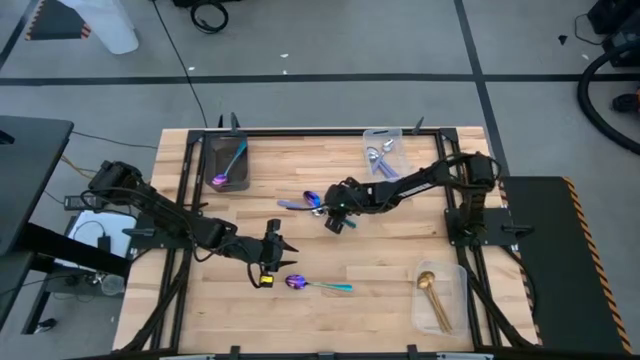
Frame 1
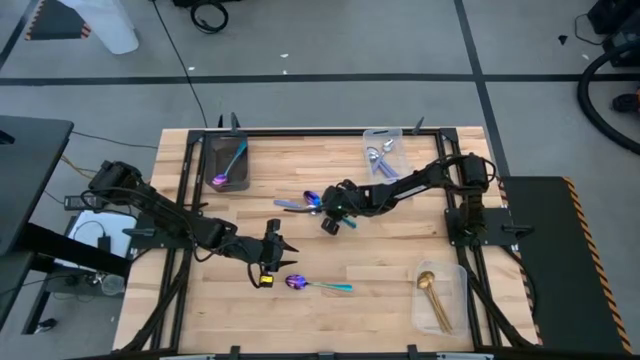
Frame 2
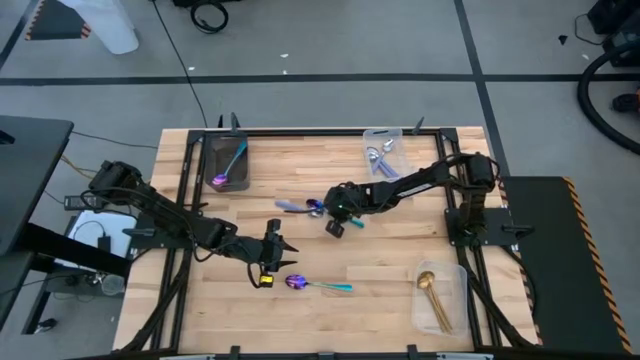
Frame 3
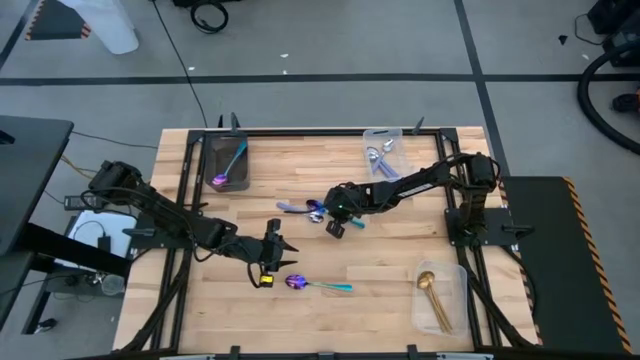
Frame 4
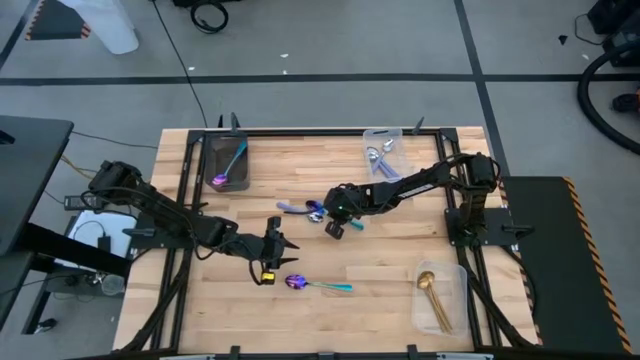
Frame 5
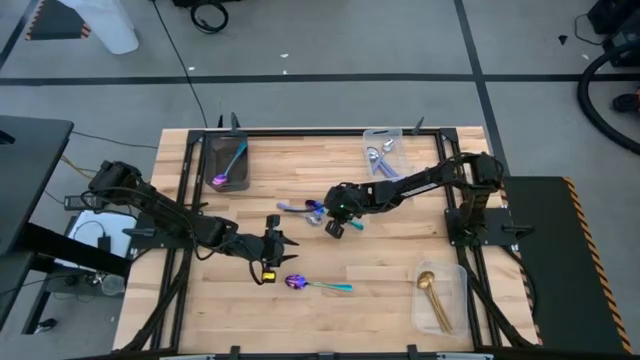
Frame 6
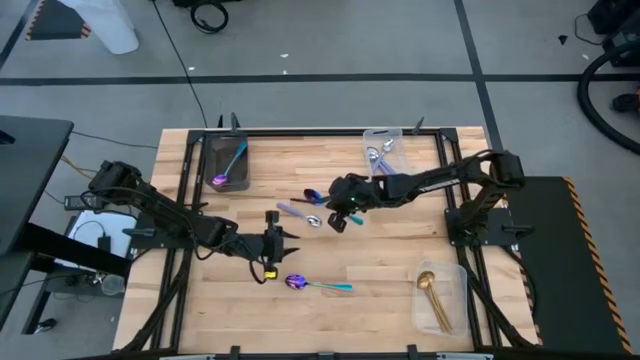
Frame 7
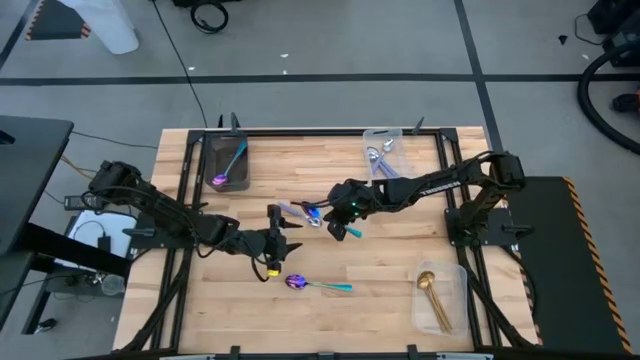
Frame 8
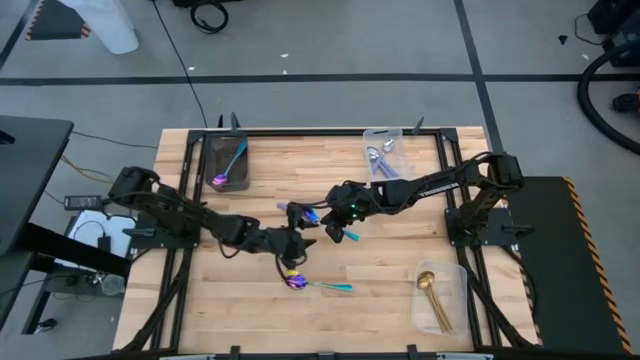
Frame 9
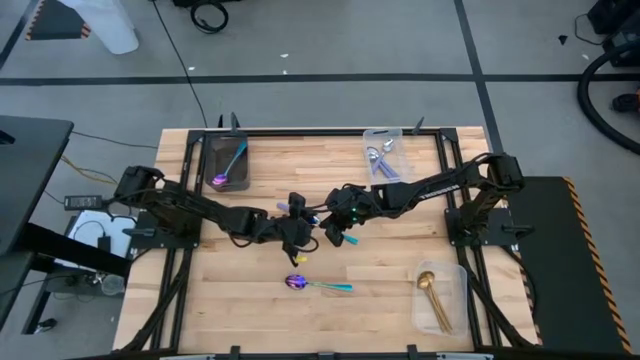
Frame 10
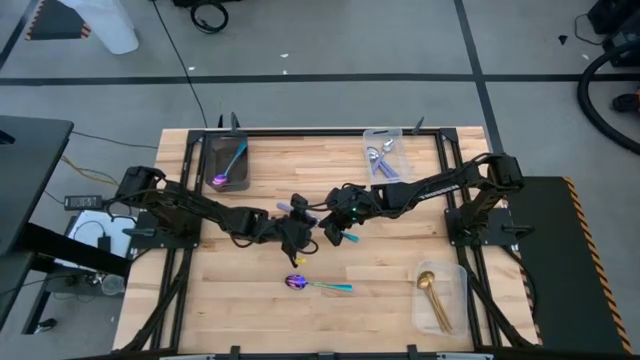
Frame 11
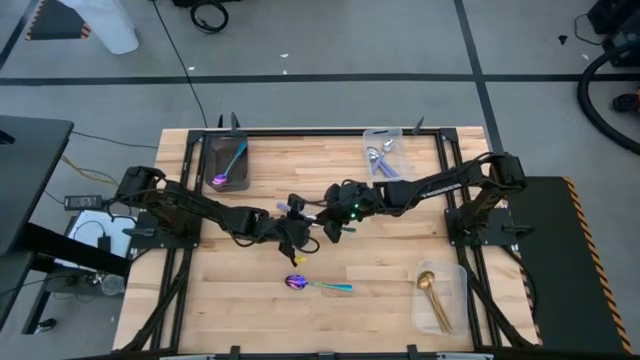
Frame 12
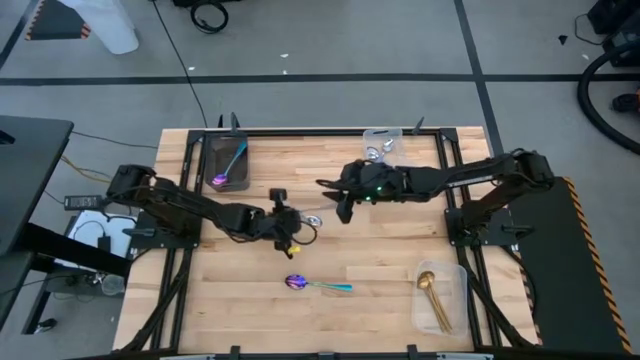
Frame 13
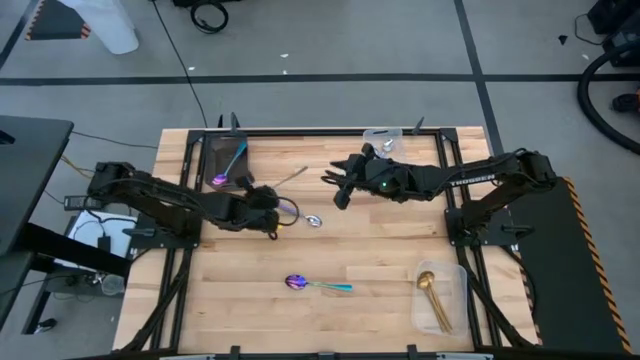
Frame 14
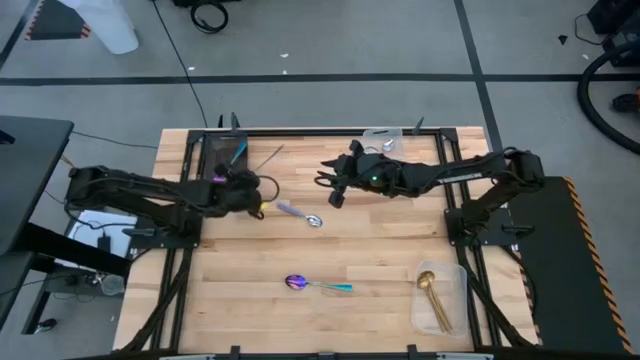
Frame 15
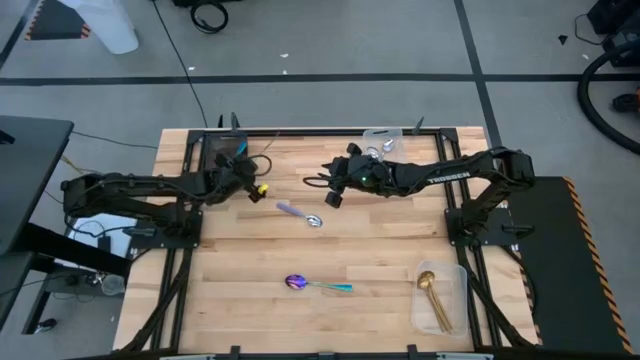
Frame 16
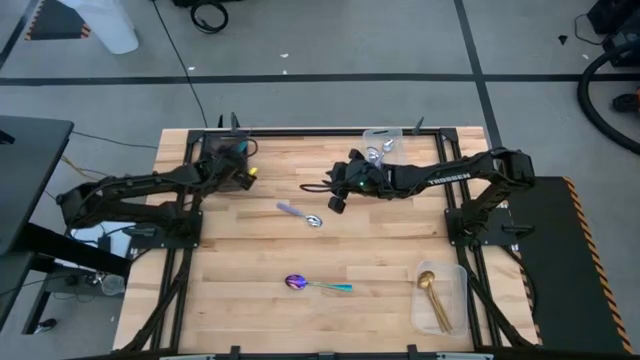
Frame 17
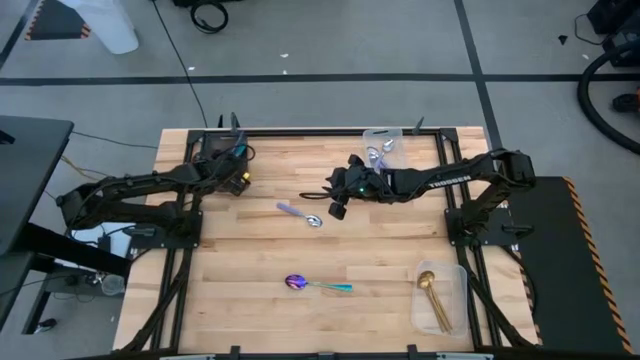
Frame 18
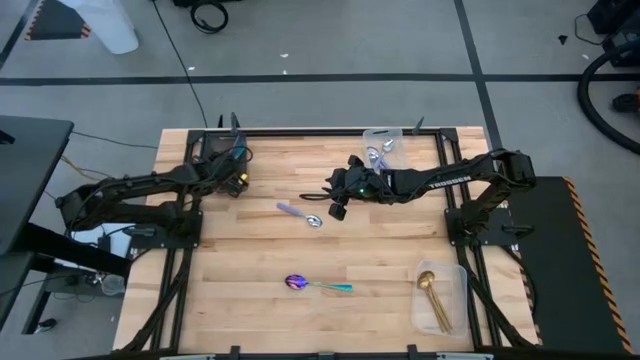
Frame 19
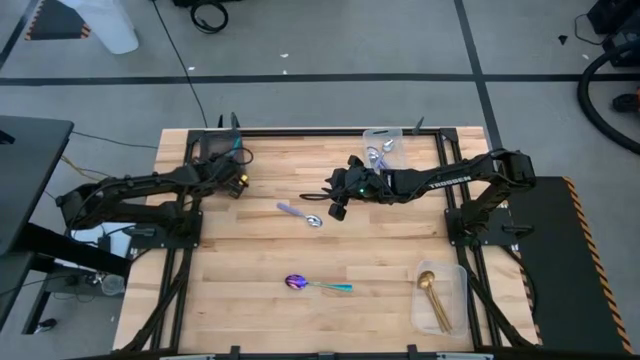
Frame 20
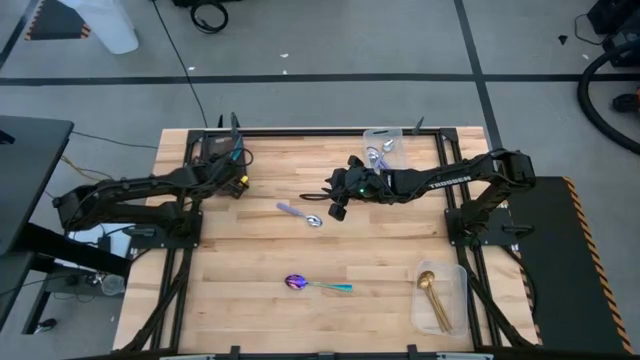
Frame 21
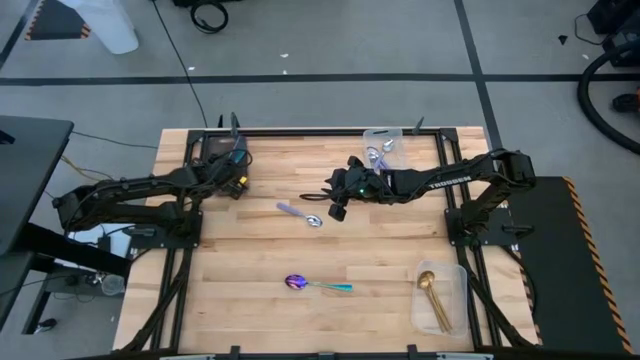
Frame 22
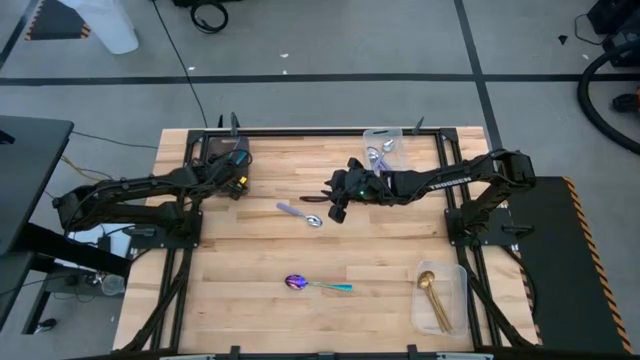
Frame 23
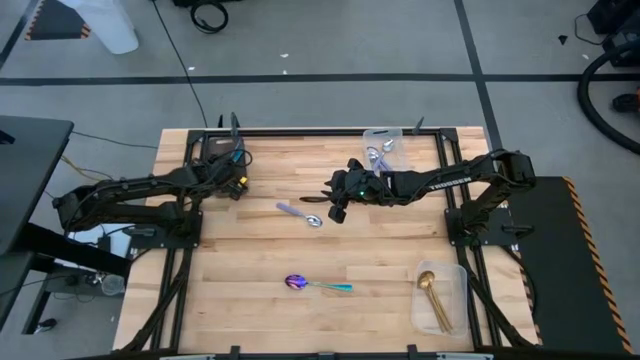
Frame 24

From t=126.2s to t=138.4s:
Task: Sort silverware by color (type)
Put the blue spoon into the black bin

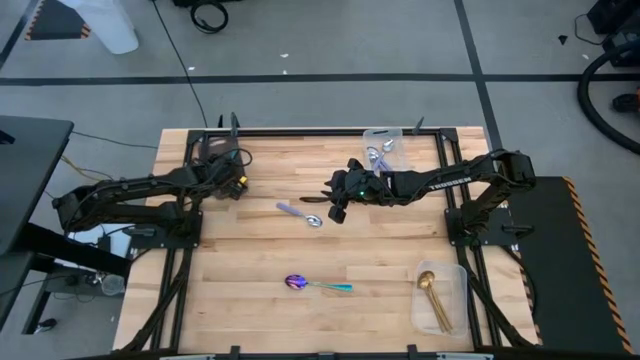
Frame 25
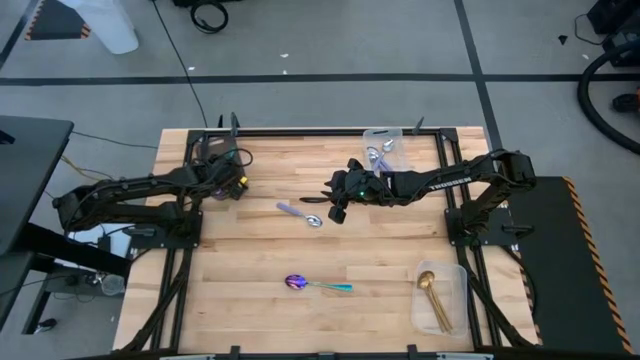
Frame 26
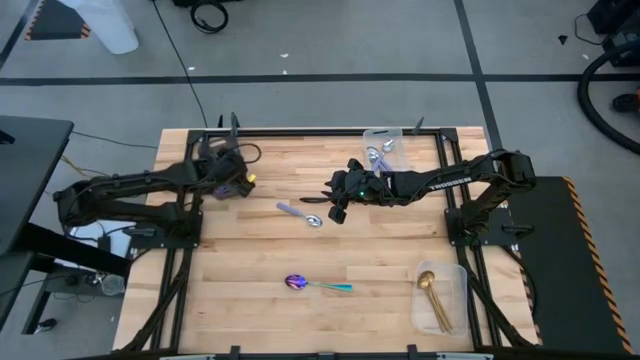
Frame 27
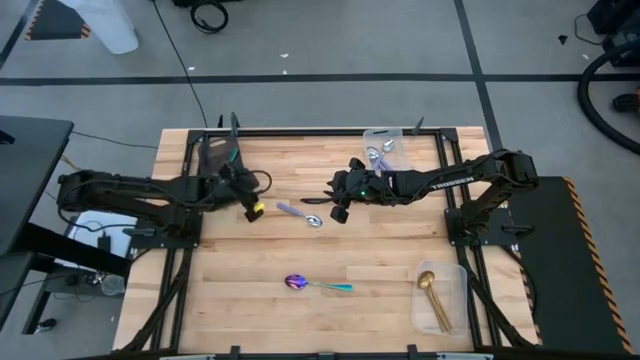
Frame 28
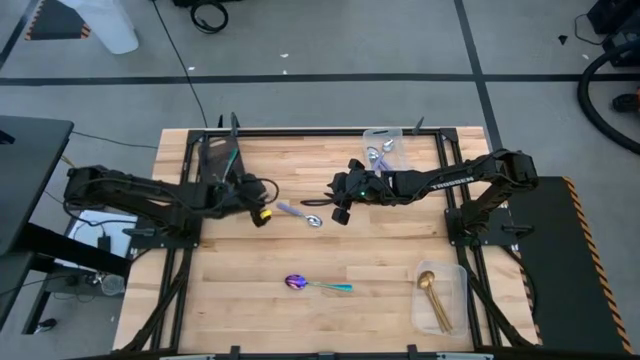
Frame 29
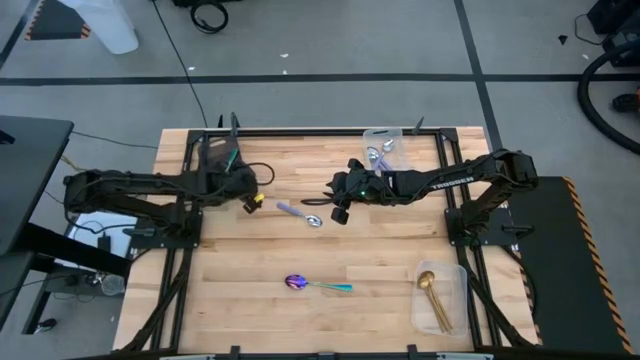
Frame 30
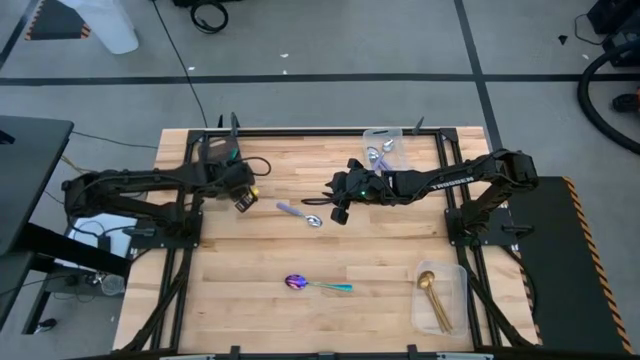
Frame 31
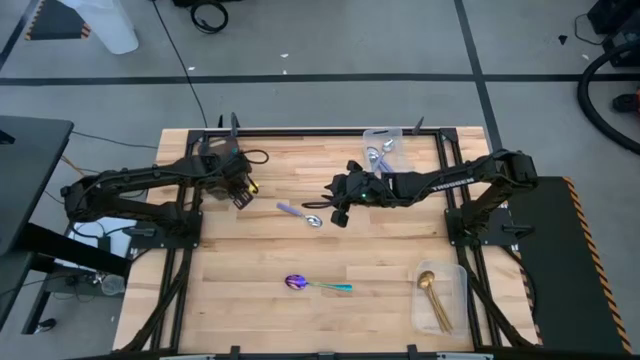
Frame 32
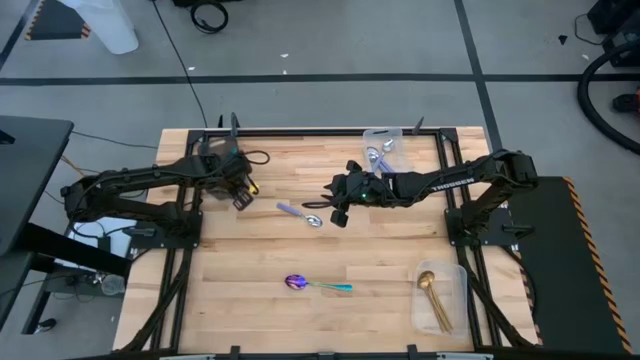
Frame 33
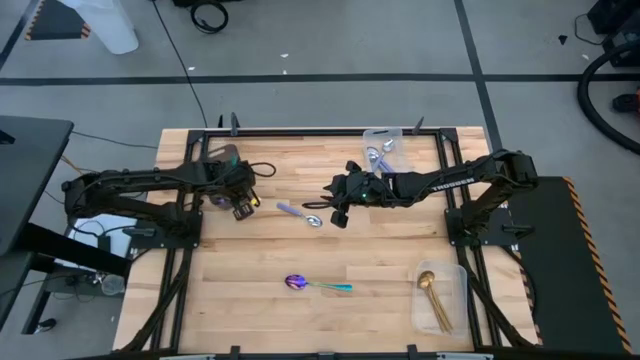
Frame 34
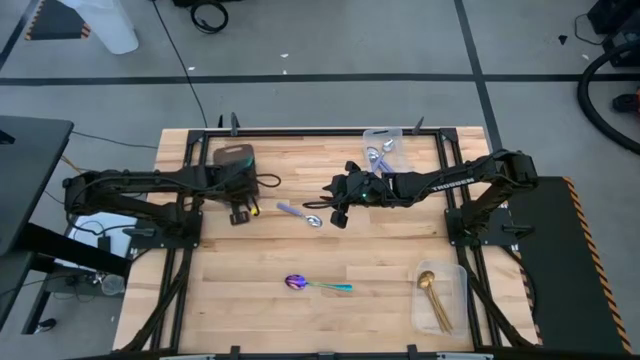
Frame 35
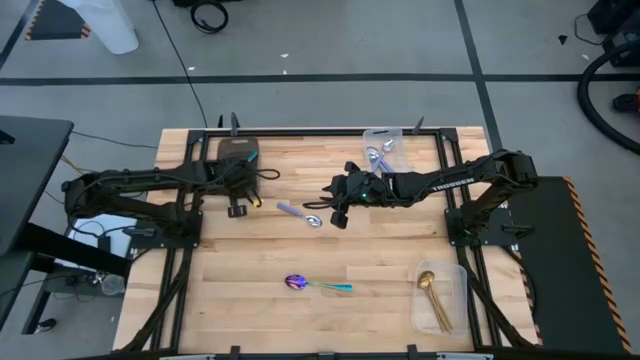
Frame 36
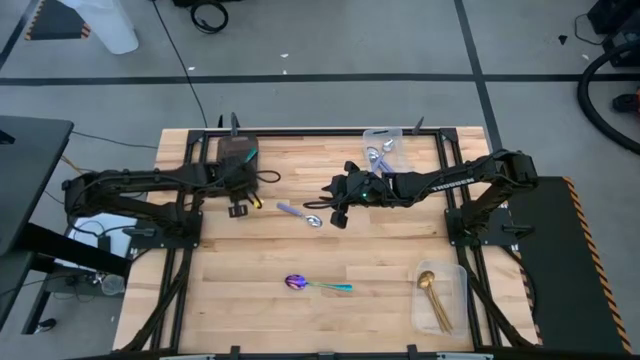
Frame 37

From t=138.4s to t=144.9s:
Adjust the black bin

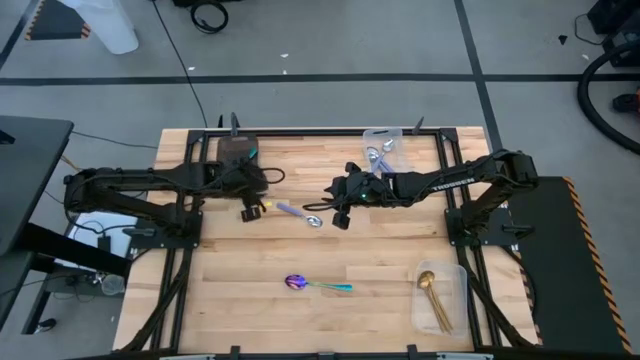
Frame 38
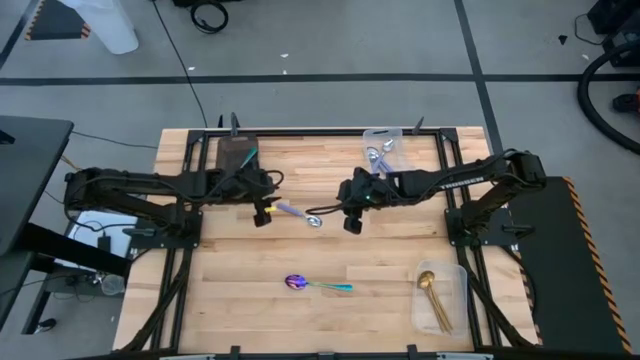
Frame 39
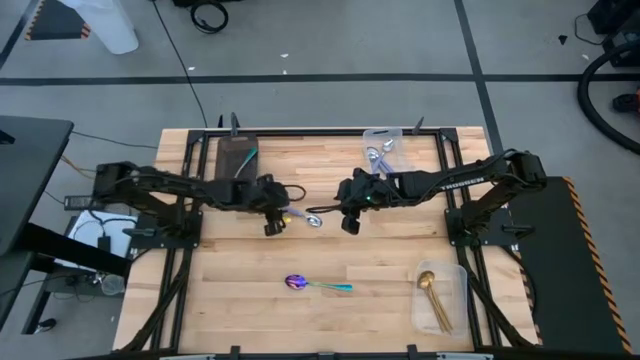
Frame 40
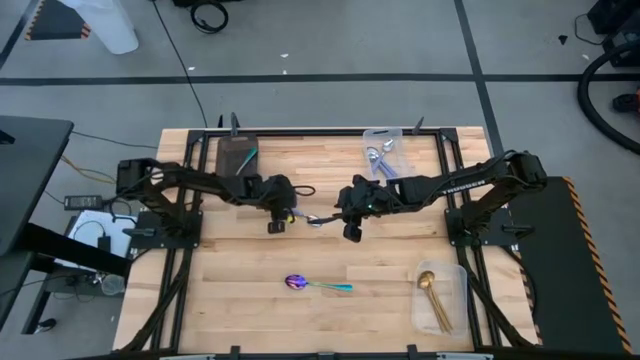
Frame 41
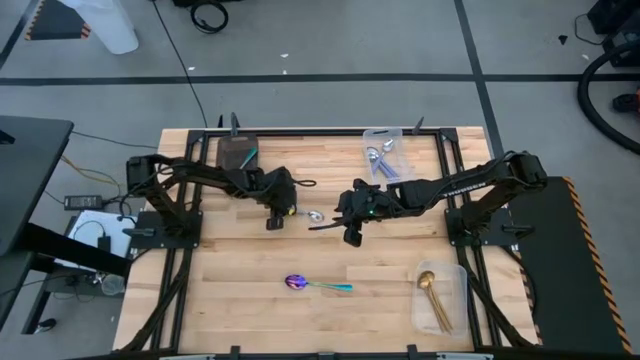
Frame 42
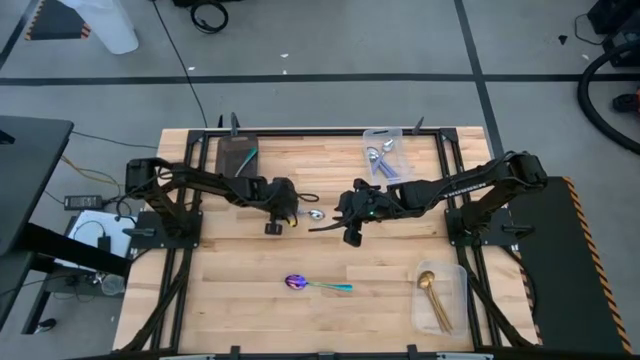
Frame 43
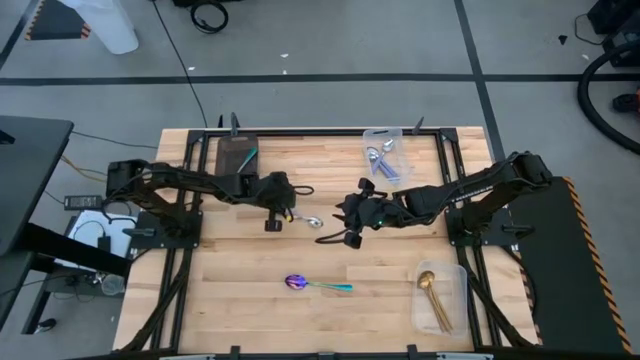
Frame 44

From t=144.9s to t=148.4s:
Put the purple spoon into the top transparent bin
